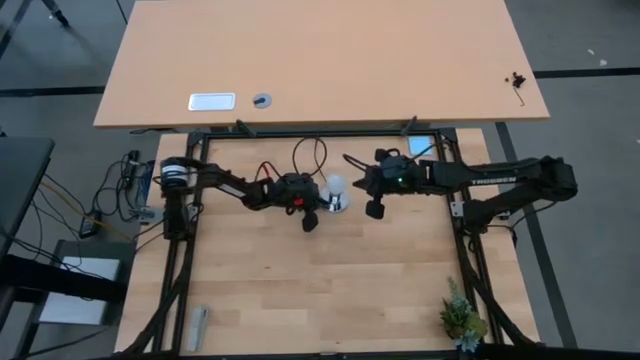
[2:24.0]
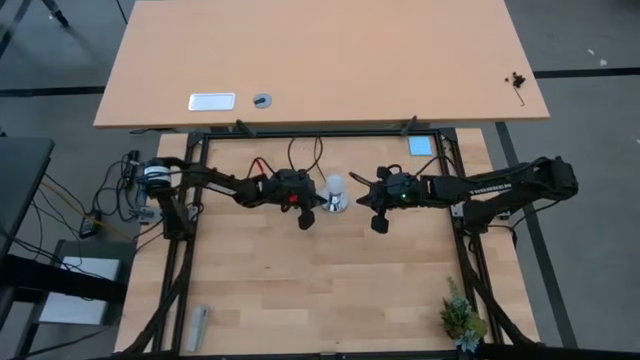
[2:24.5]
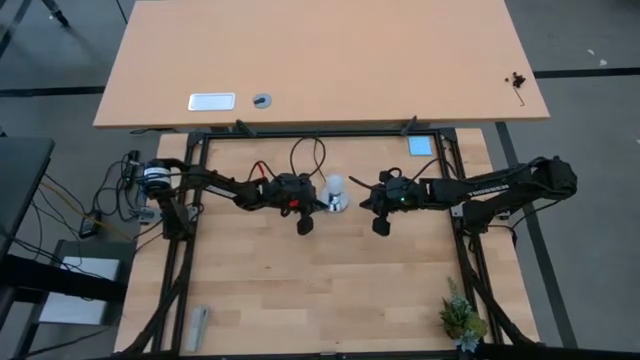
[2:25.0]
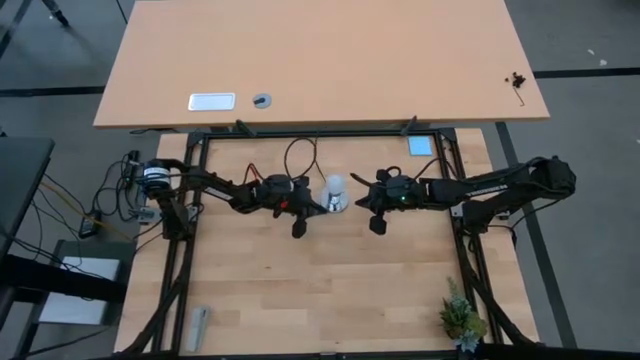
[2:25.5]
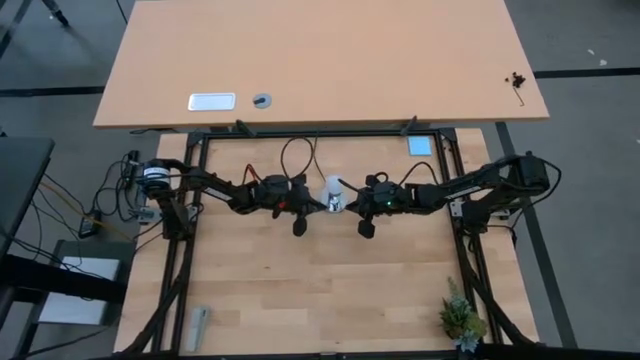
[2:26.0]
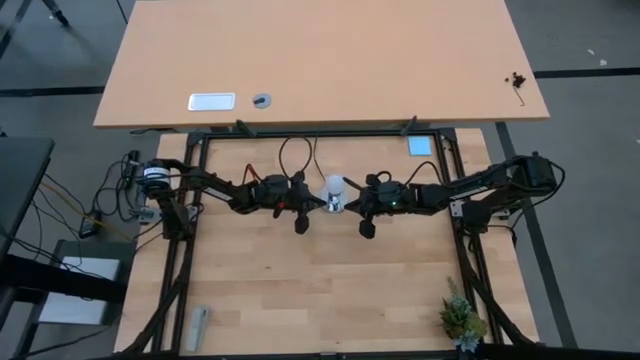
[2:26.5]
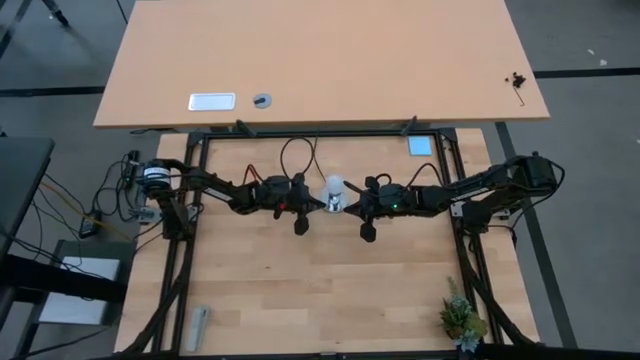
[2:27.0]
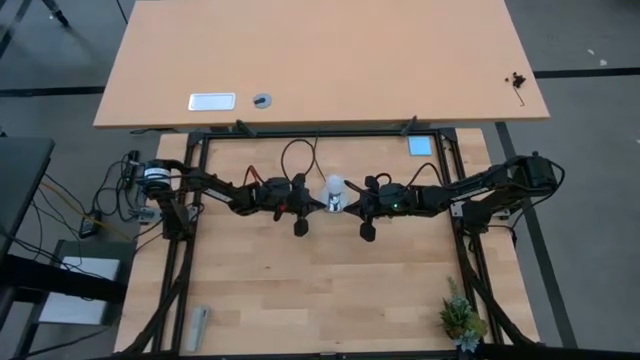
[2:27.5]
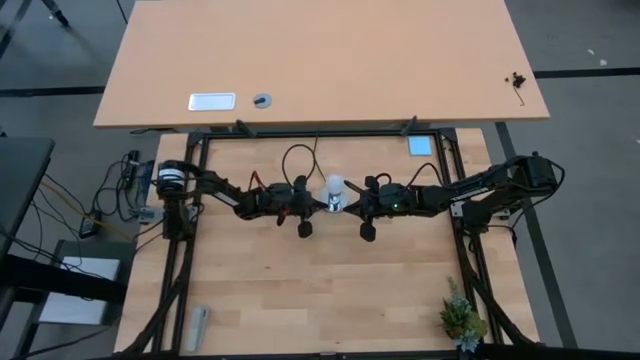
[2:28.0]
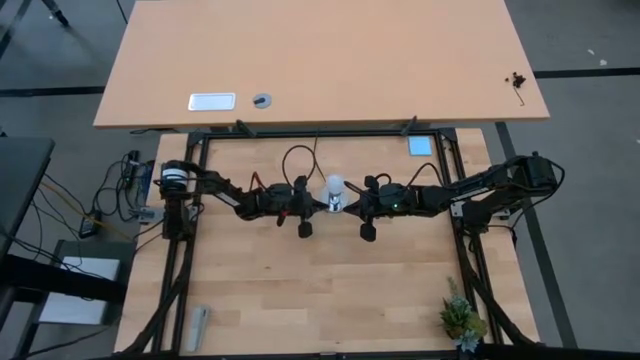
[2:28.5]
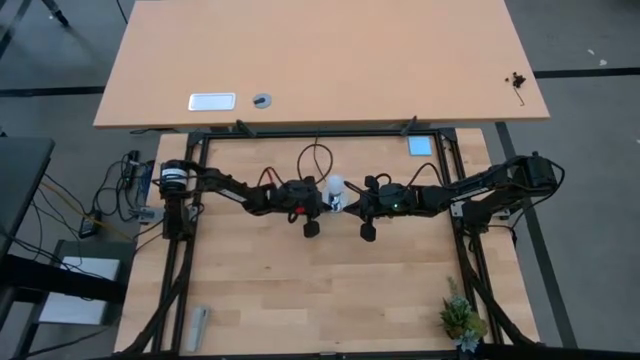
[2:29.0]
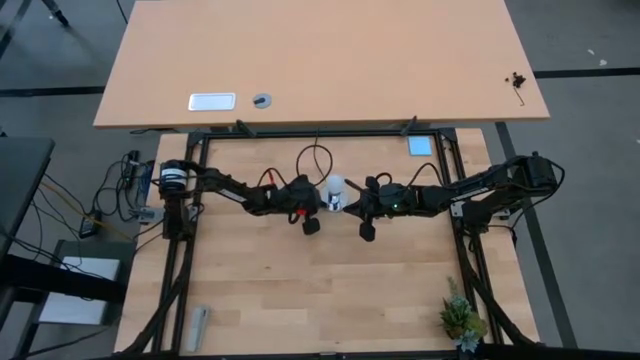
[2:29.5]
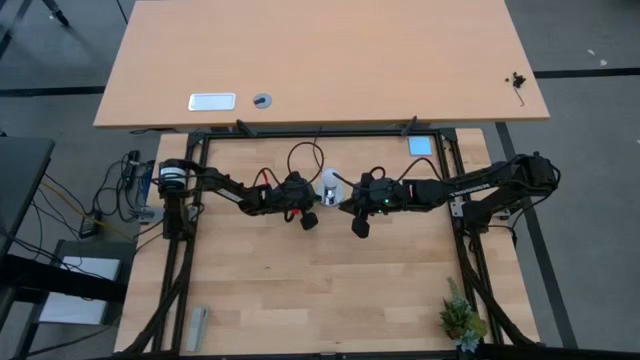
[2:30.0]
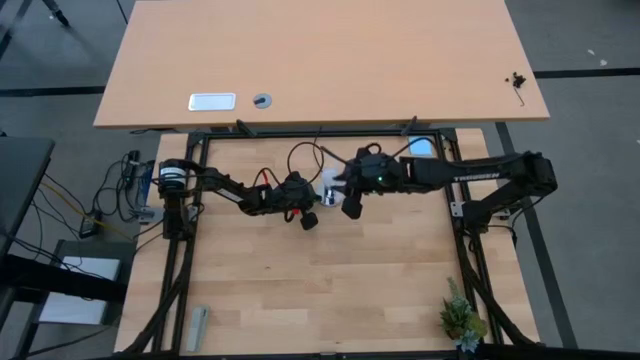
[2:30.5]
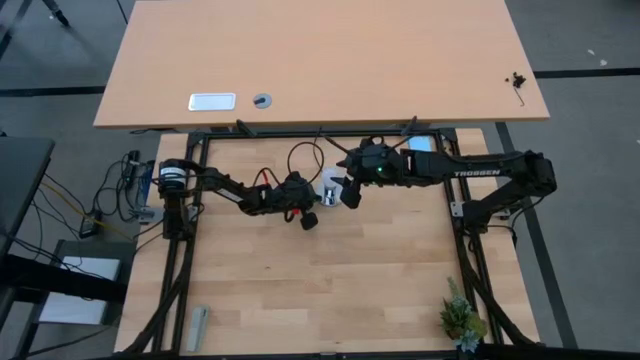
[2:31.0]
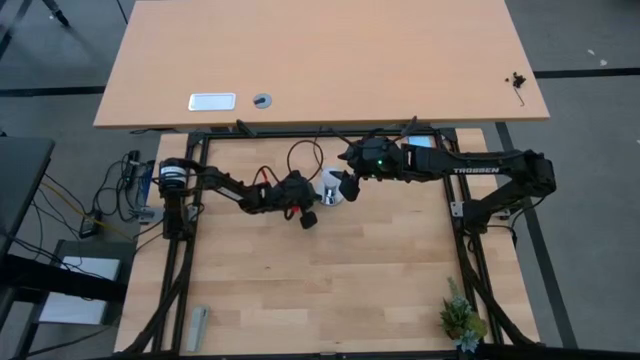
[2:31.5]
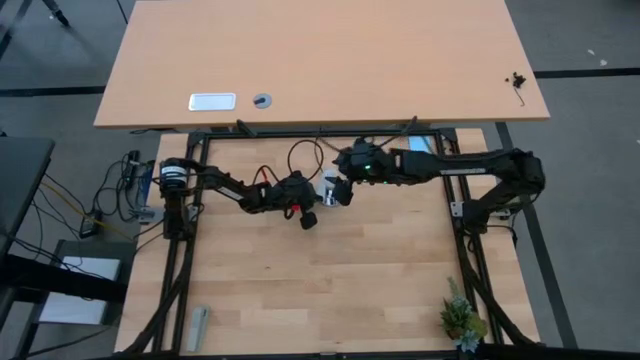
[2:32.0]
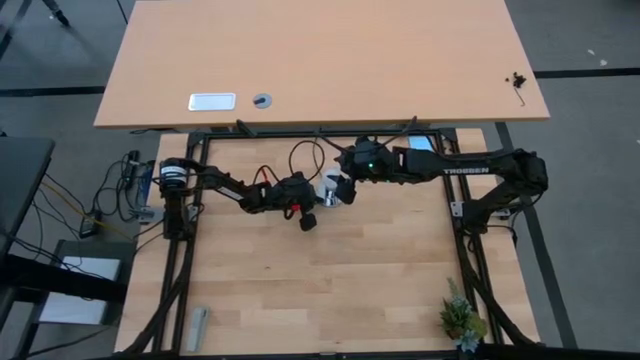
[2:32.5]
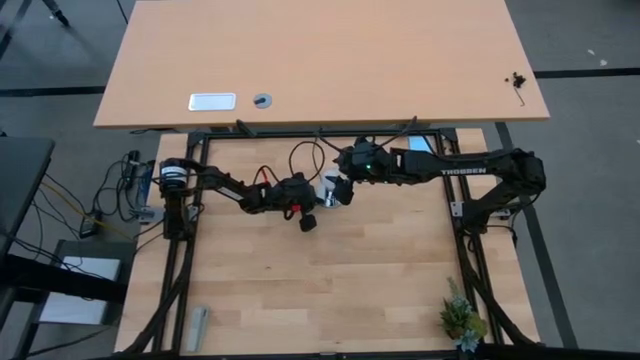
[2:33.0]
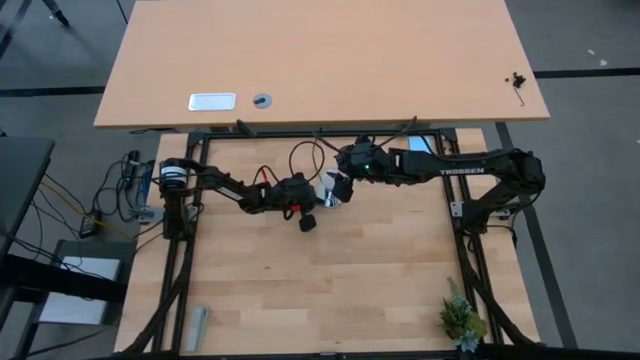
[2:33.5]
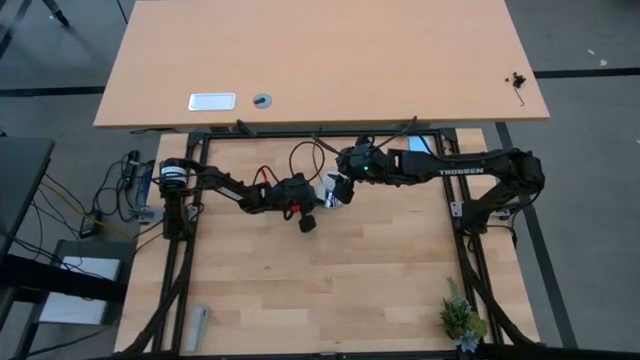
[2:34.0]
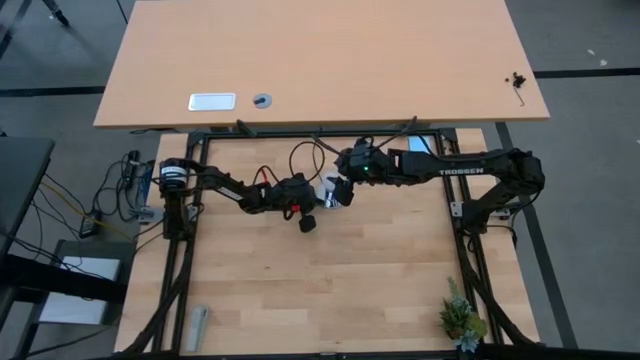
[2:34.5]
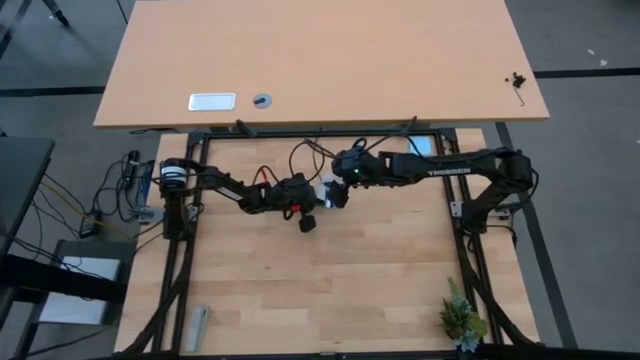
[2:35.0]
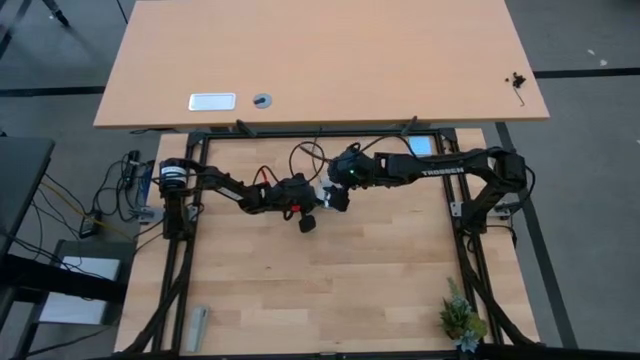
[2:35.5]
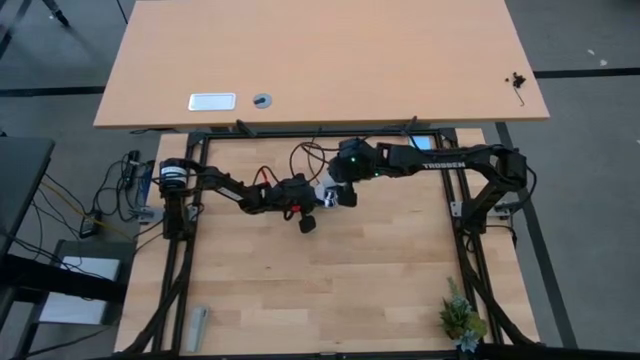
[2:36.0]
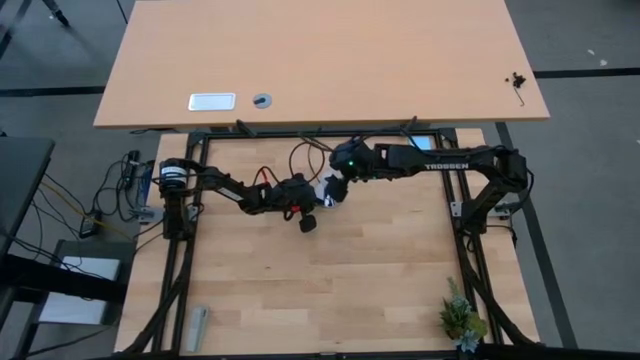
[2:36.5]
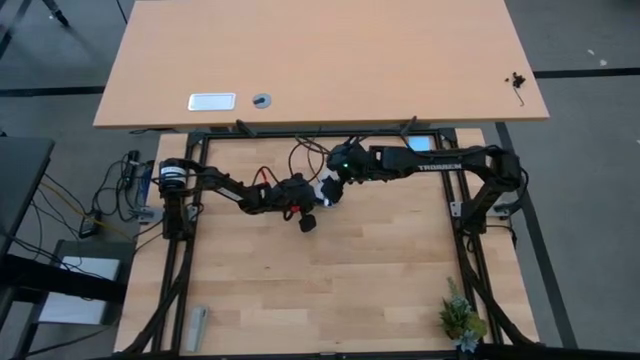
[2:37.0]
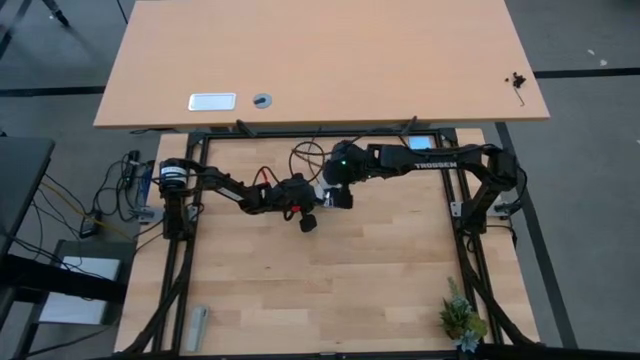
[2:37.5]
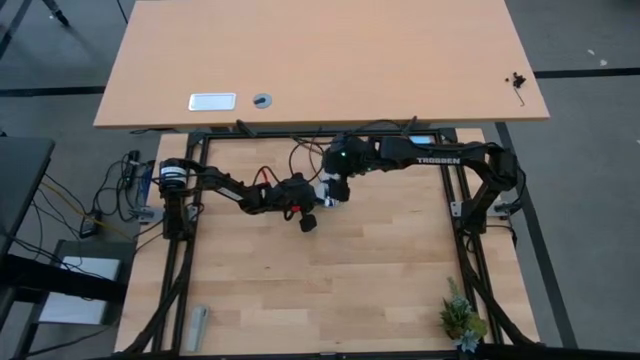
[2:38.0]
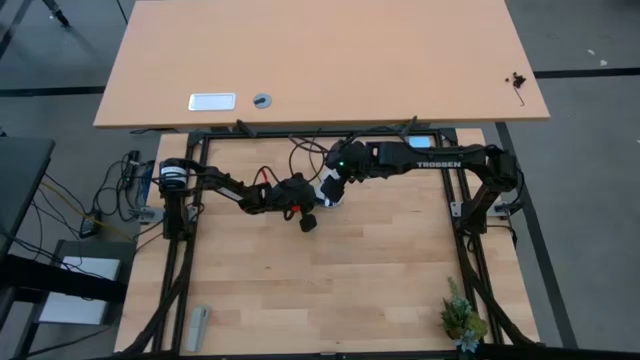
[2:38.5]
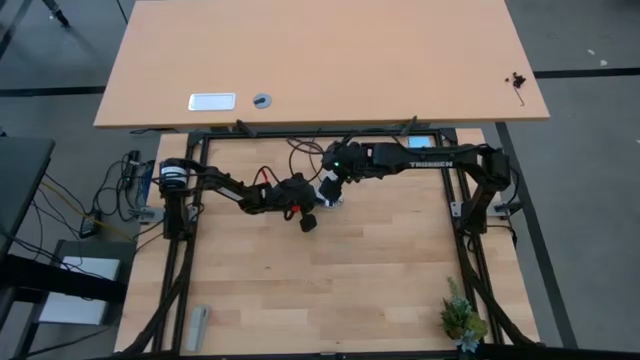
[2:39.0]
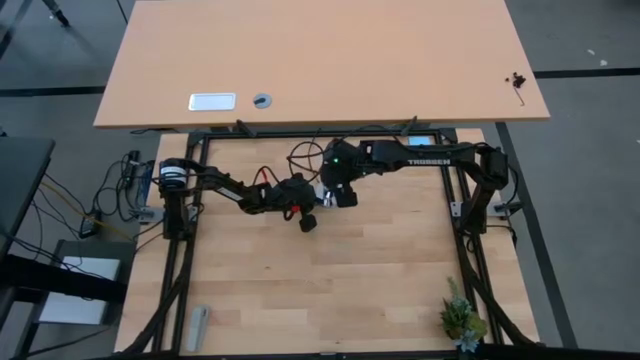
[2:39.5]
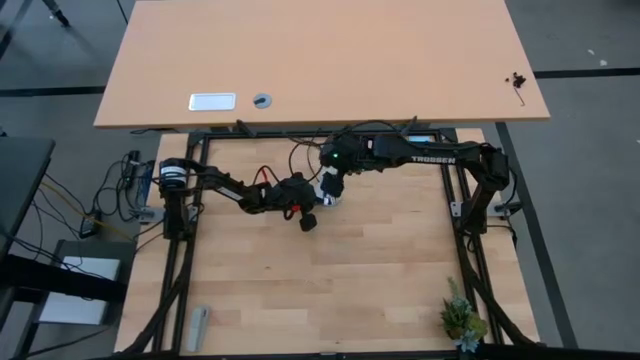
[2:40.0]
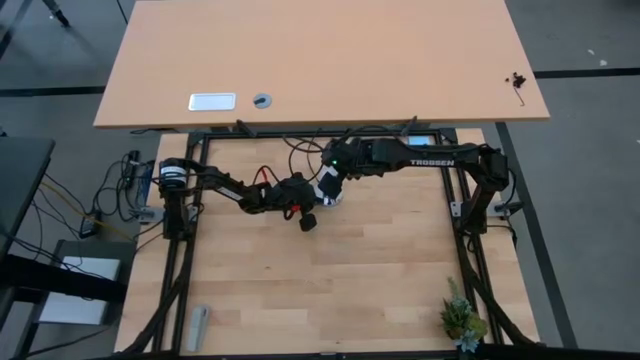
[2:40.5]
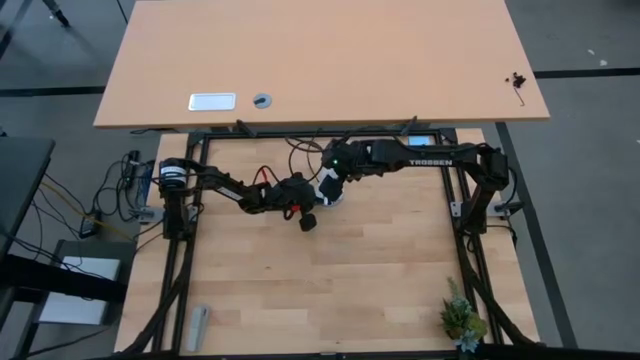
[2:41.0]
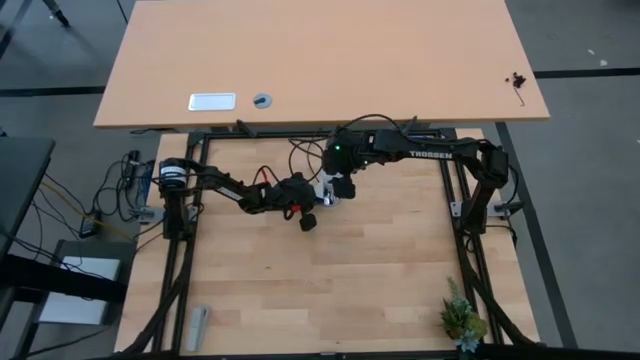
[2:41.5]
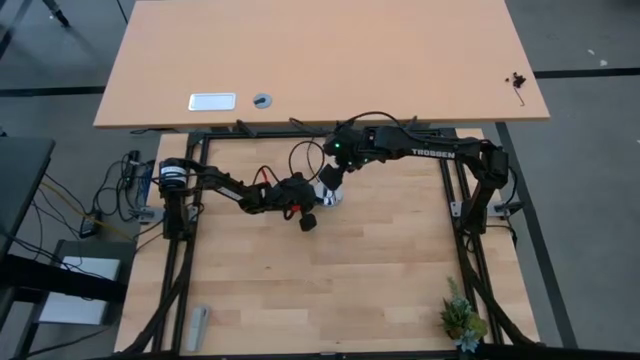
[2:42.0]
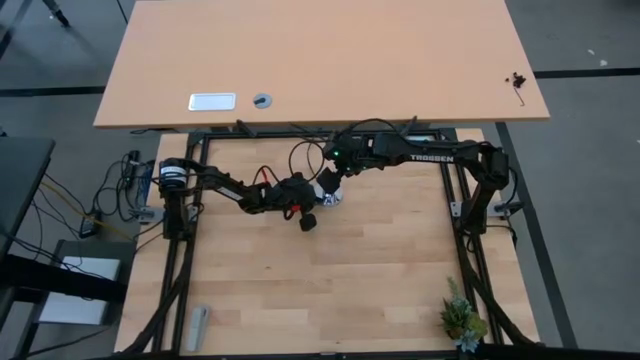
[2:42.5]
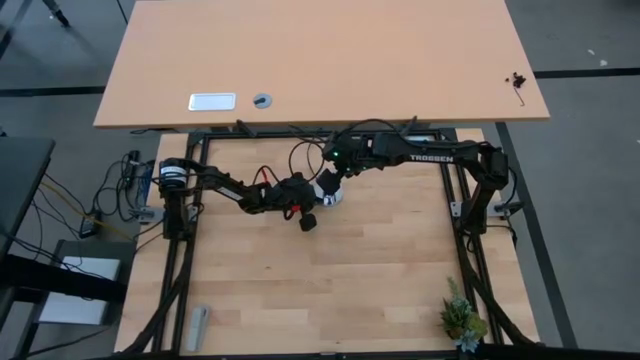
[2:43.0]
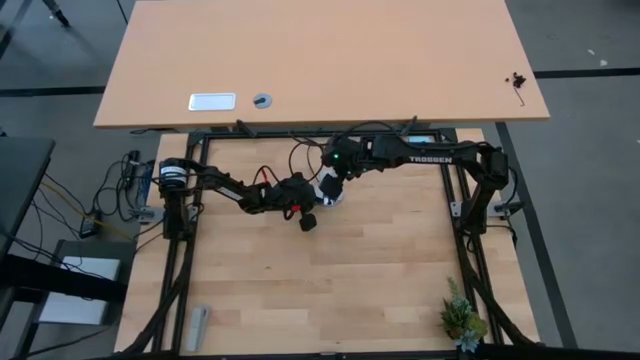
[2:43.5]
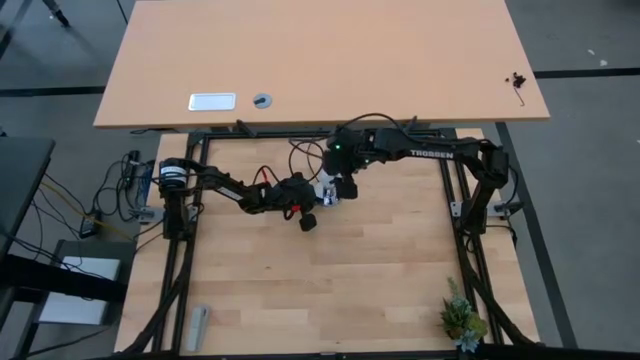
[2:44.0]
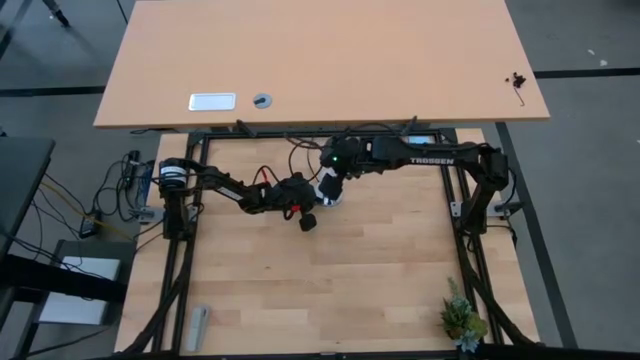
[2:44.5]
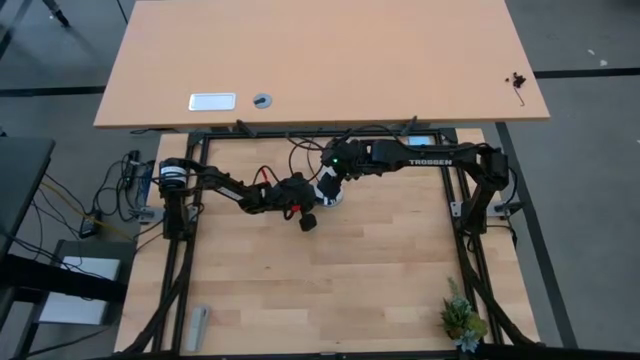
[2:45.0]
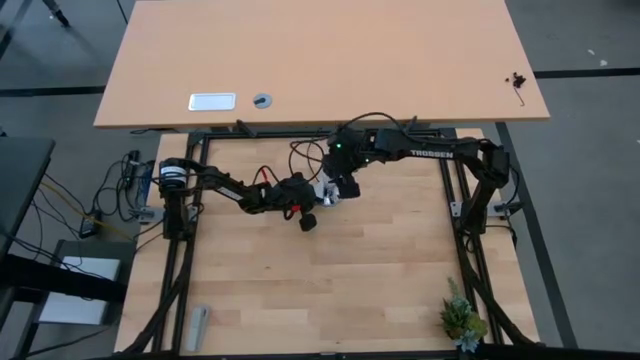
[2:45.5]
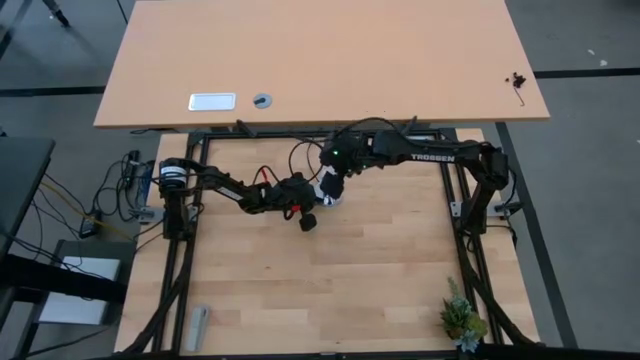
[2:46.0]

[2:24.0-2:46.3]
Task: Screw lightbulb
Remove the lightbulb from the lamp
